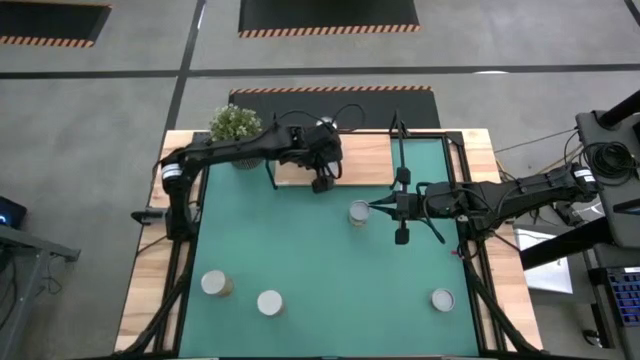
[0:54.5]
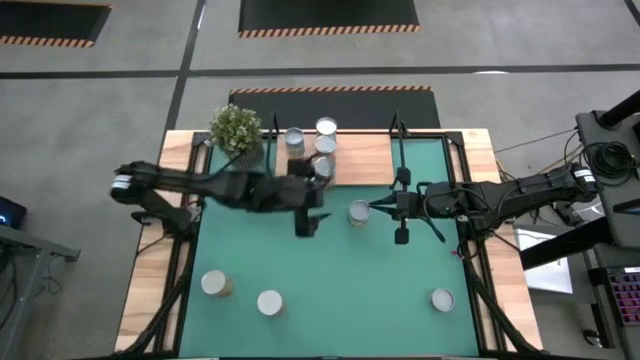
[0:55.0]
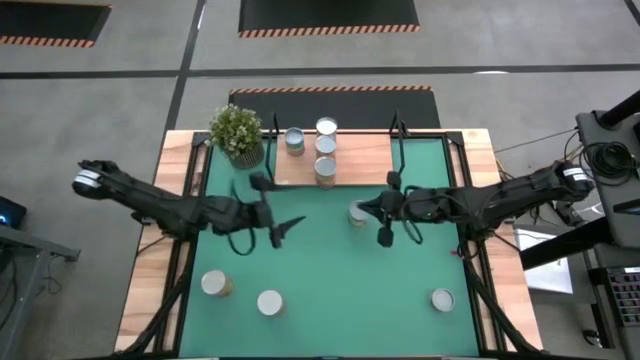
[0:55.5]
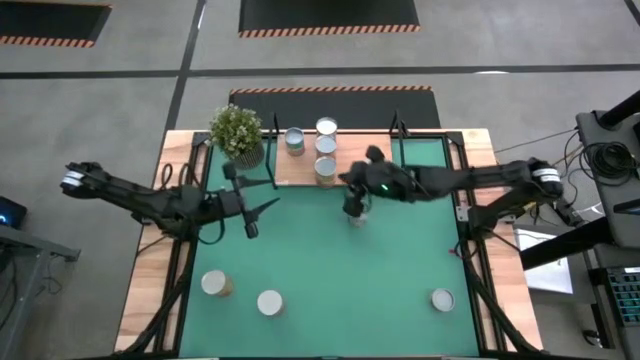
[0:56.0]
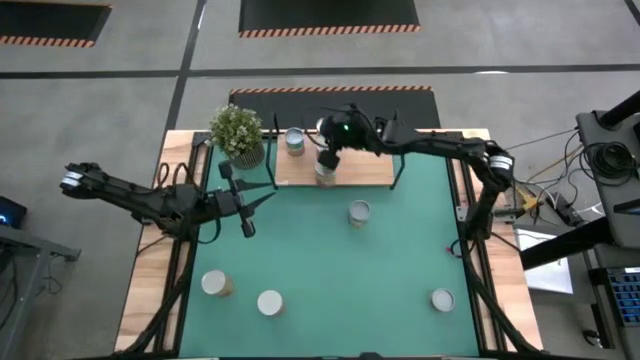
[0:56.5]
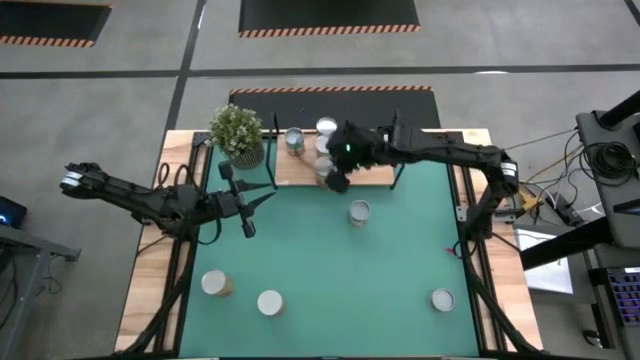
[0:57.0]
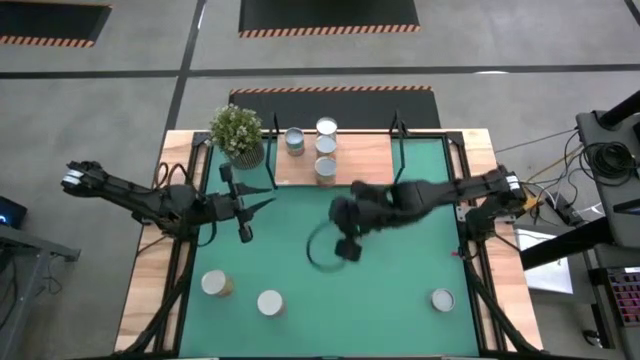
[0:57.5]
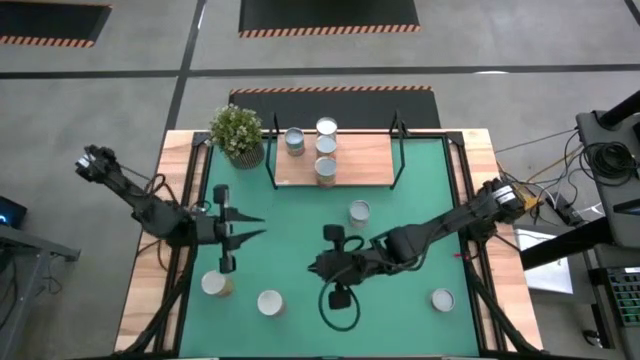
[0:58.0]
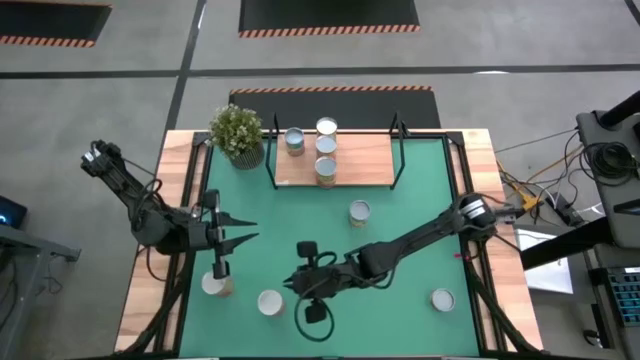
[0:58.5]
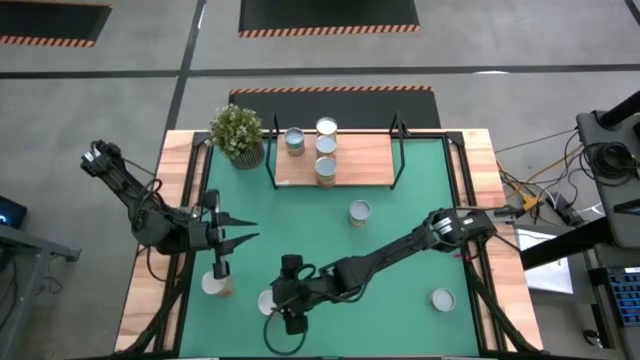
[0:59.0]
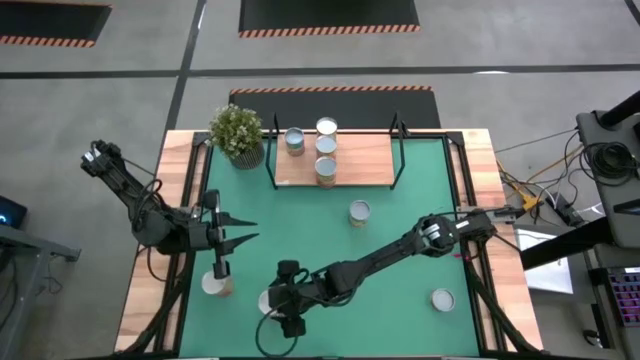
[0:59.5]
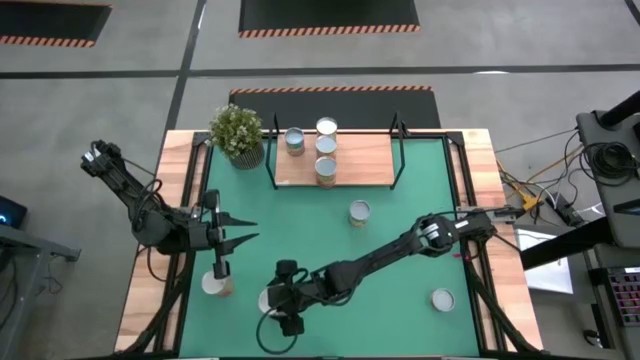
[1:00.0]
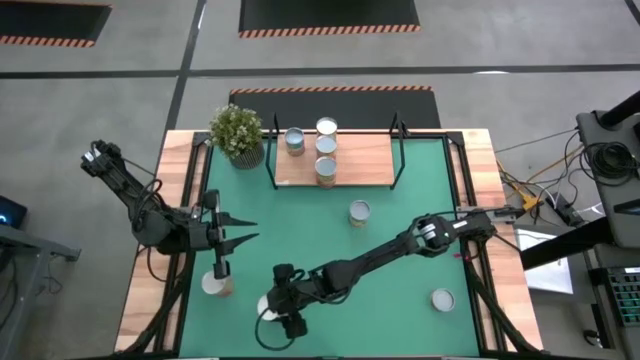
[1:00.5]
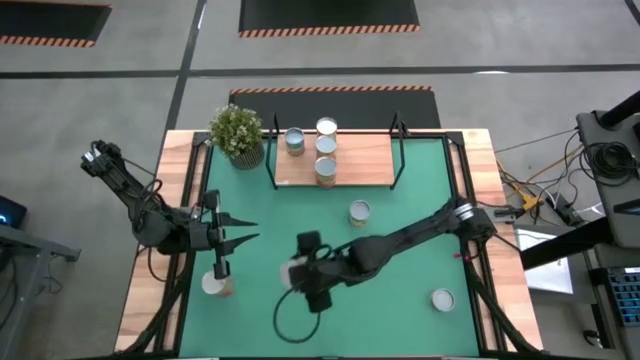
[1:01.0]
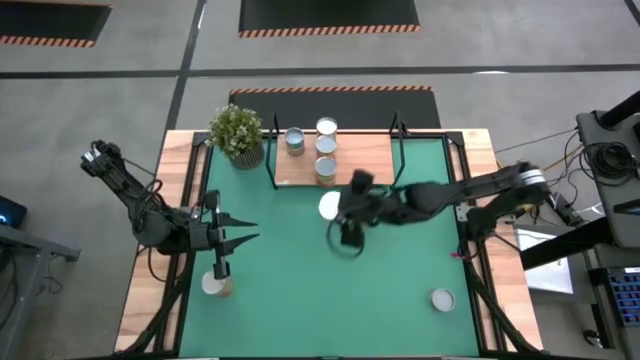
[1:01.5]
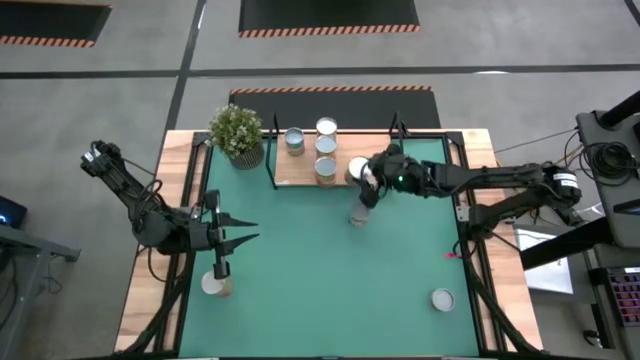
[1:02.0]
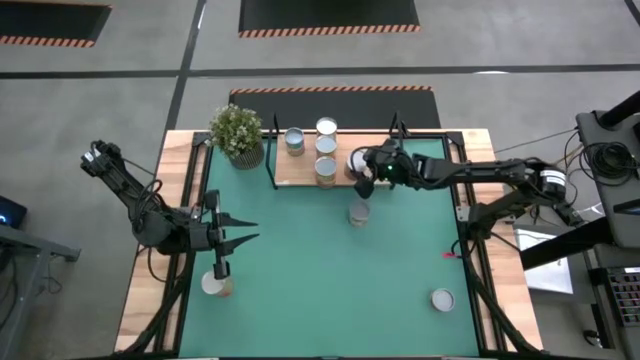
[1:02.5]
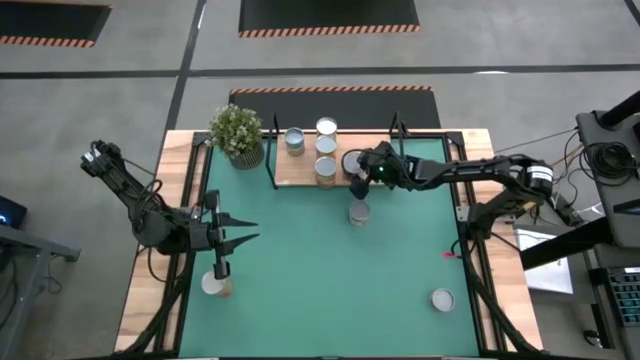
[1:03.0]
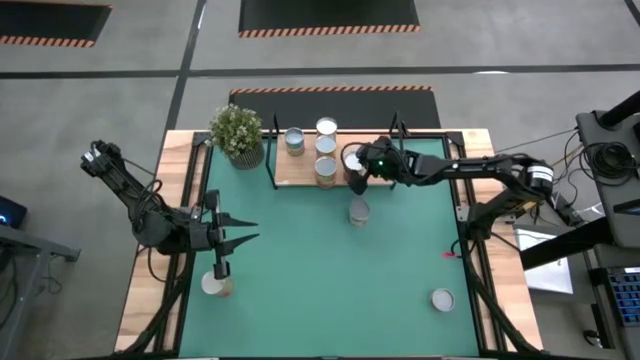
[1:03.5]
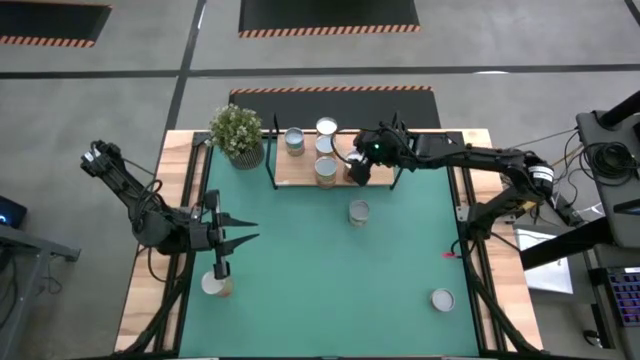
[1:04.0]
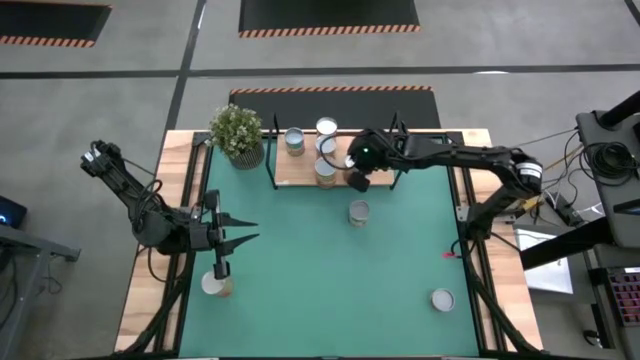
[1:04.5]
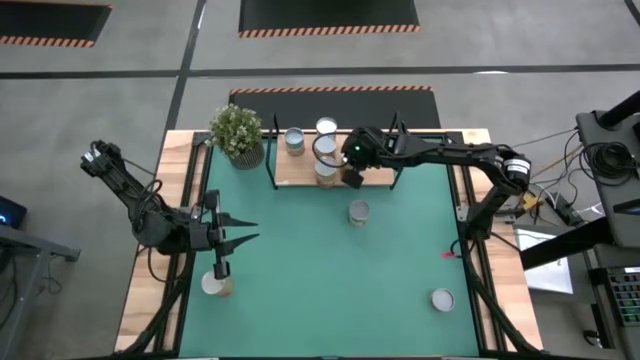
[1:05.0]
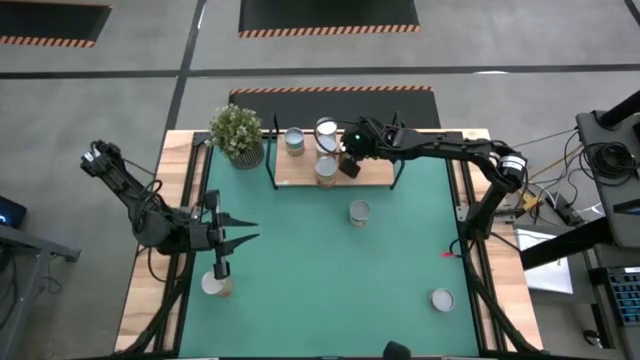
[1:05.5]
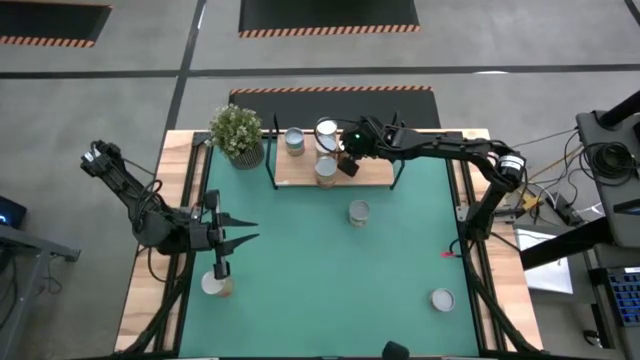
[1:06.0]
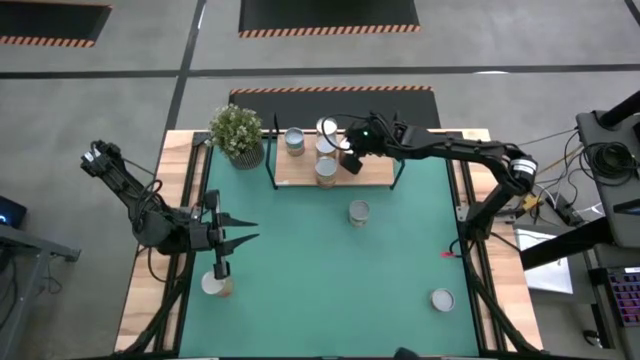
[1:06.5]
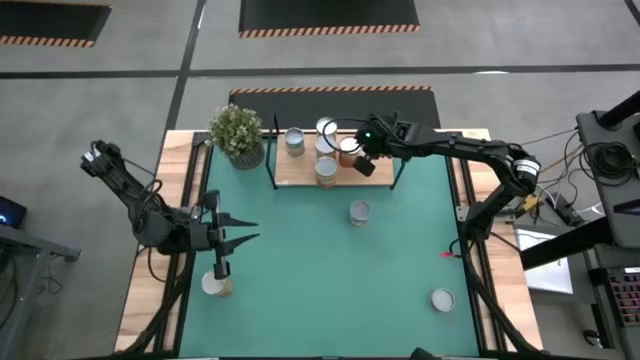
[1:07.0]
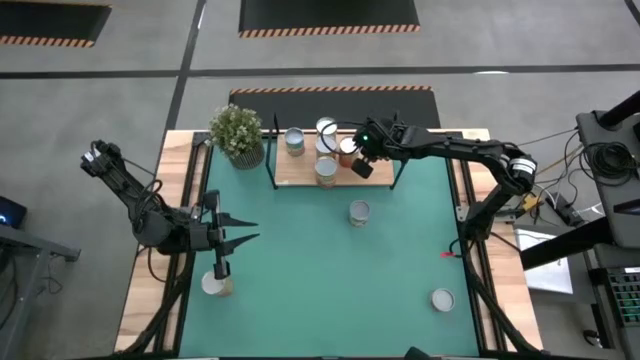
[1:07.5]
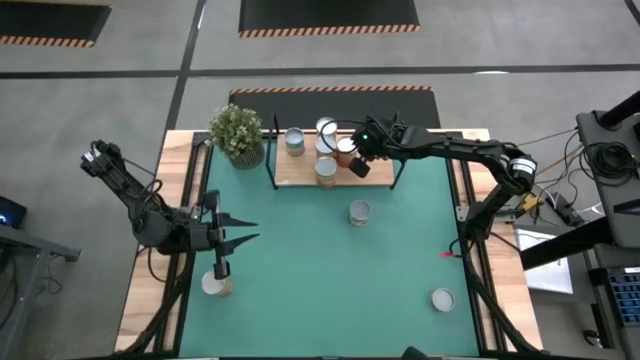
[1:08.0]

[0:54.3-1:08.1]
Task: Pick and place cans onto a shelf
Put the canned green beans on the shelf

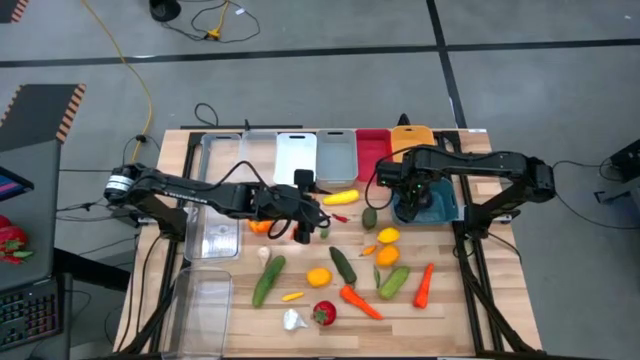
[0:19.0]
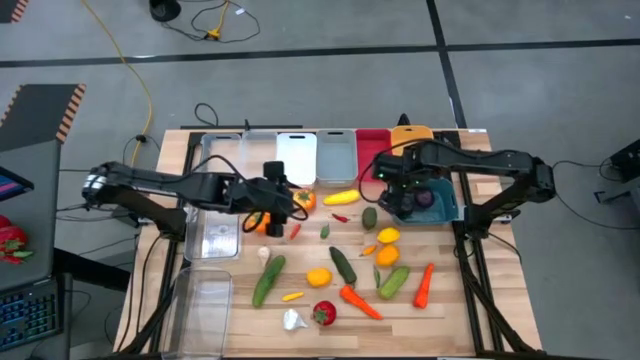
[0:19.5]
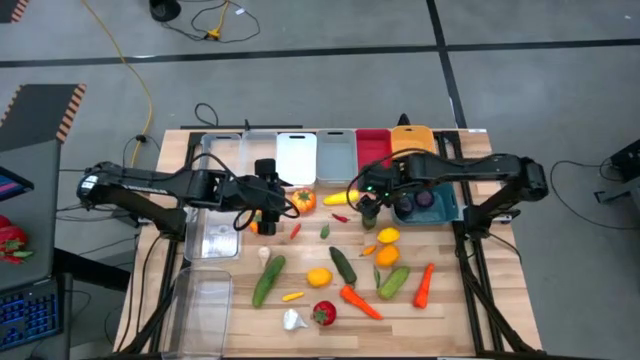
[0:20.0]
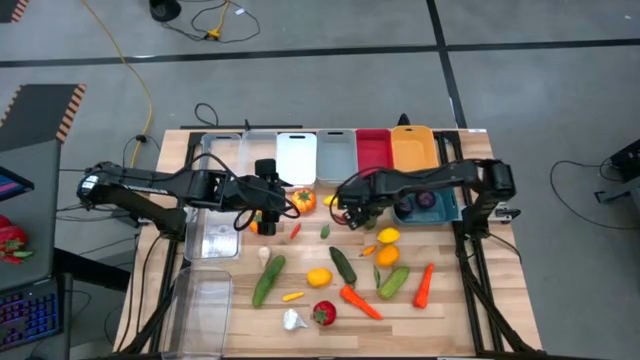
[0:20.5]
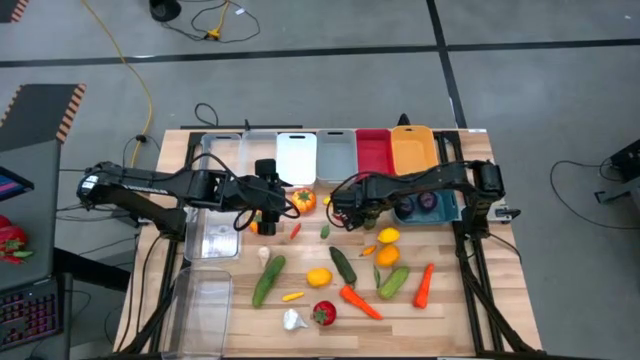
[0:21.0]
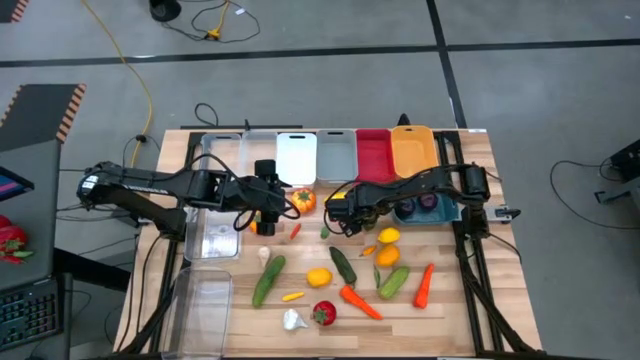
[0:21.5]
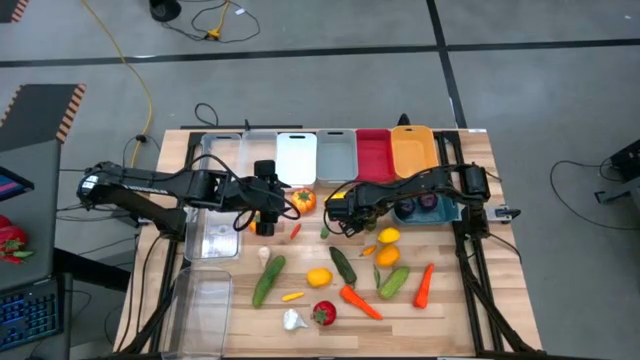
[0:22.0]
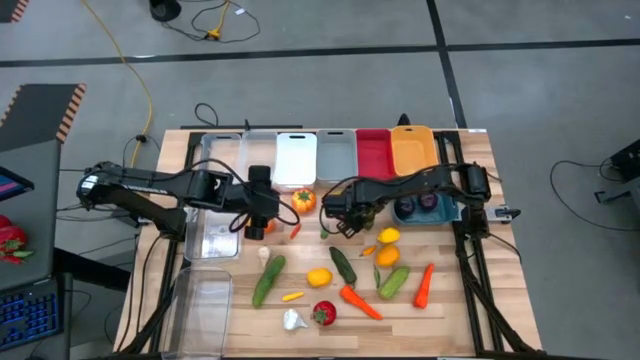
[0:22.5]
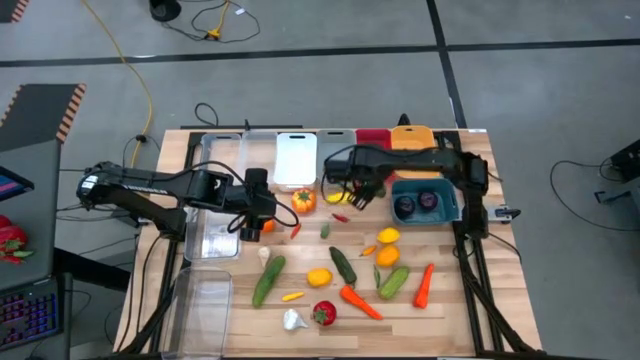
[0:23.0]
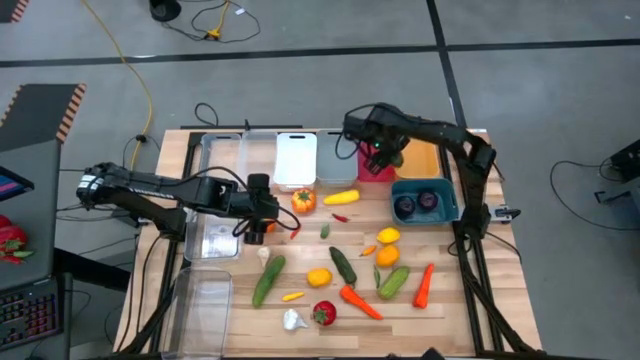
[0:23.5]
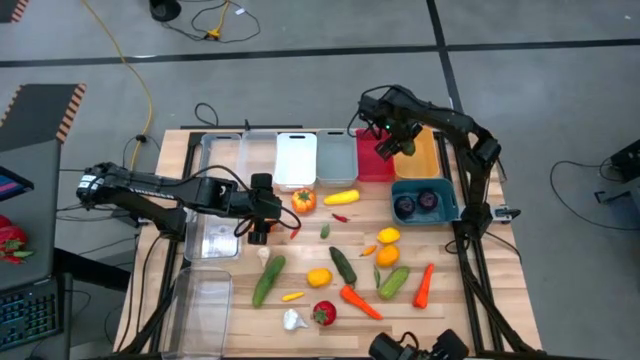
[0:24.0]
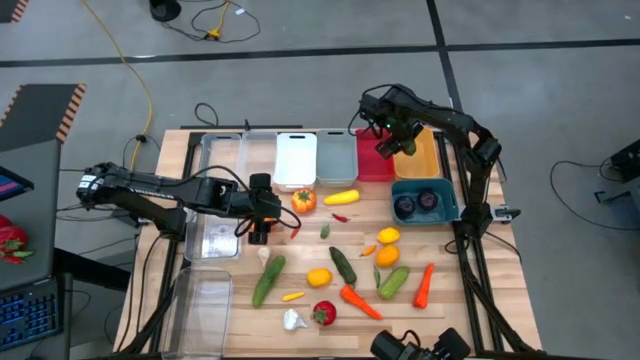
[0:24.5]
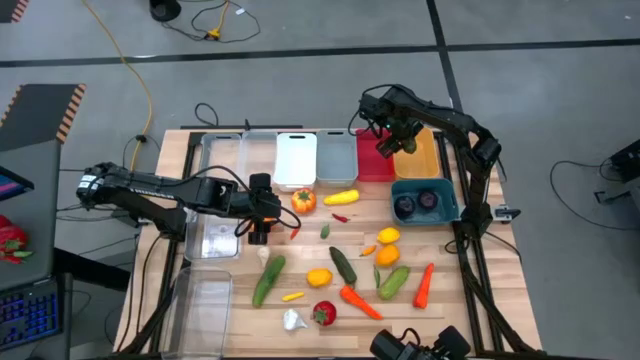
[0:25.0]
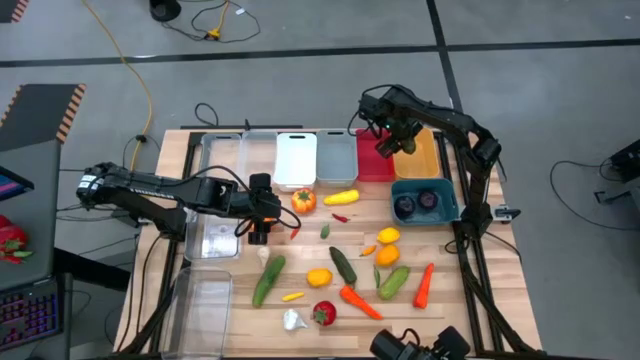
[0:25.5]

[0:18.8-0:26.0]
Task: Sort produce into baskets
Put the lime into the yellow bin
